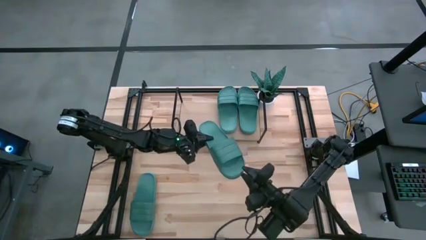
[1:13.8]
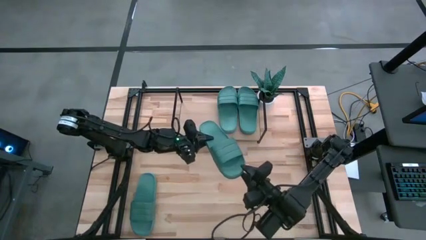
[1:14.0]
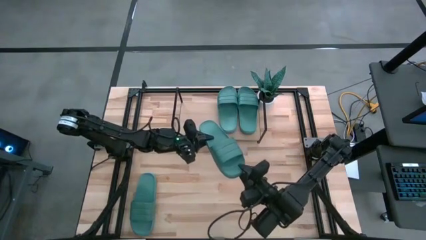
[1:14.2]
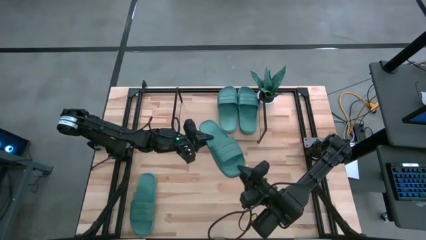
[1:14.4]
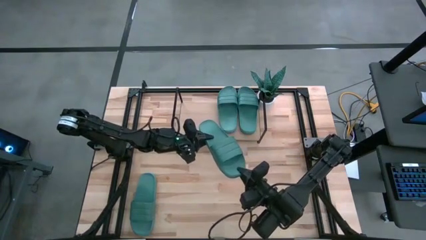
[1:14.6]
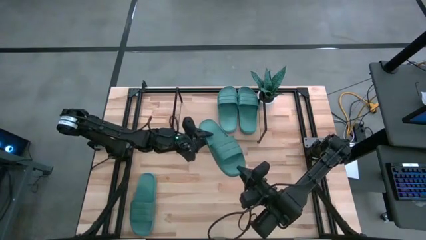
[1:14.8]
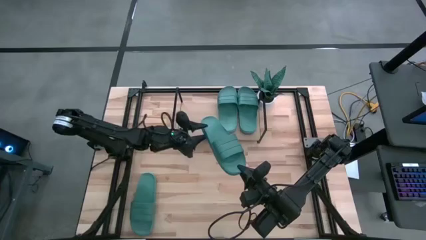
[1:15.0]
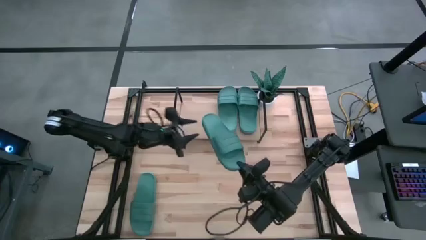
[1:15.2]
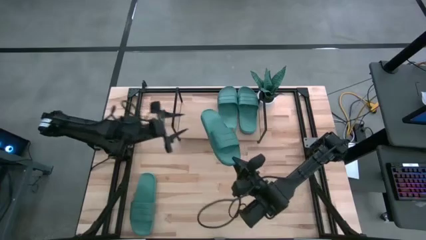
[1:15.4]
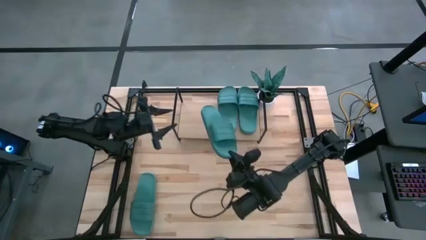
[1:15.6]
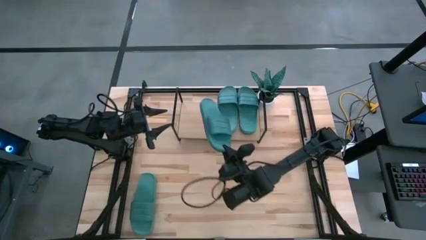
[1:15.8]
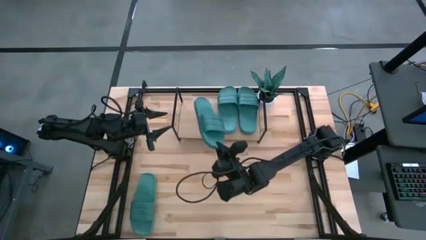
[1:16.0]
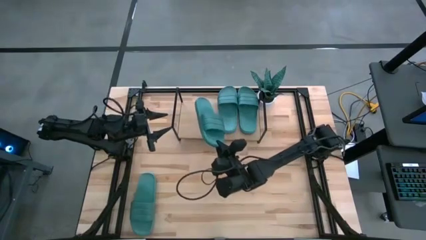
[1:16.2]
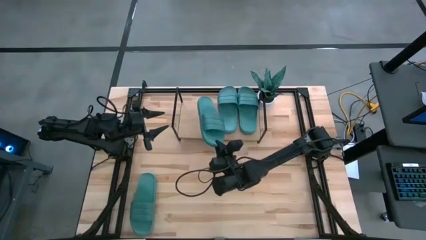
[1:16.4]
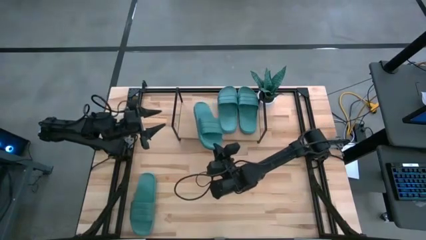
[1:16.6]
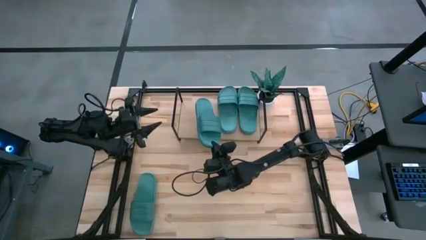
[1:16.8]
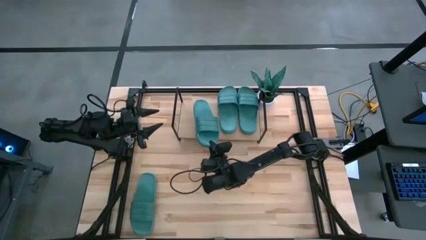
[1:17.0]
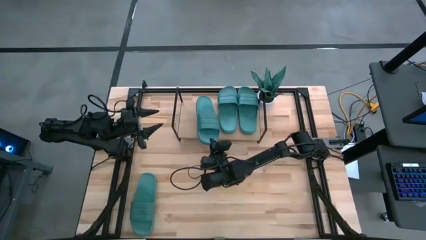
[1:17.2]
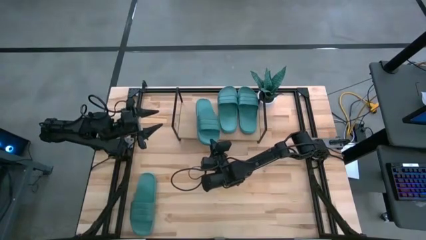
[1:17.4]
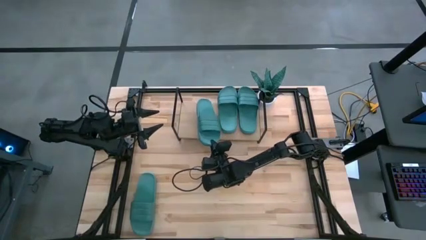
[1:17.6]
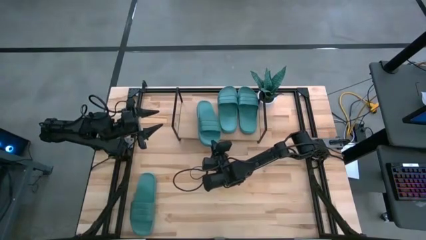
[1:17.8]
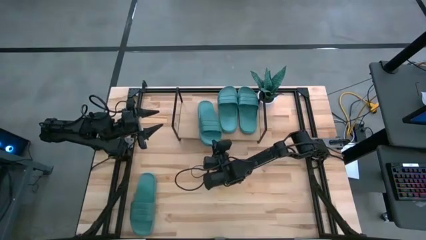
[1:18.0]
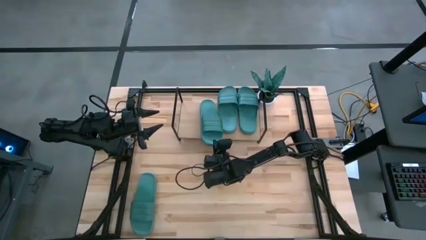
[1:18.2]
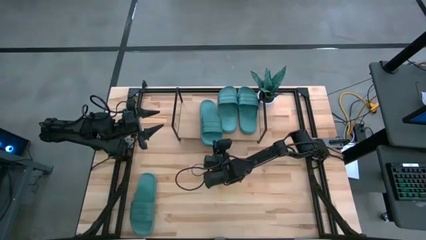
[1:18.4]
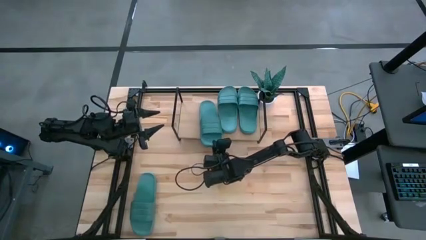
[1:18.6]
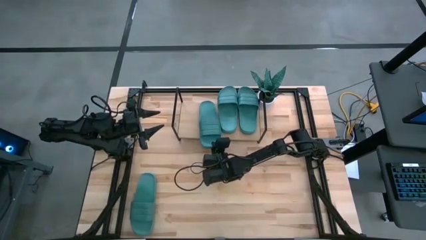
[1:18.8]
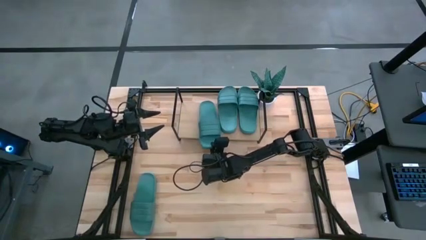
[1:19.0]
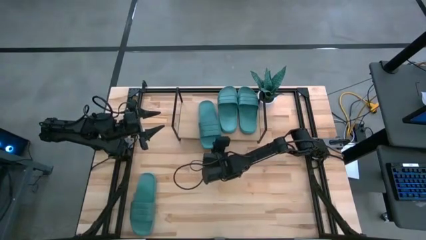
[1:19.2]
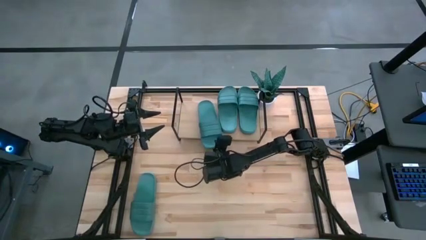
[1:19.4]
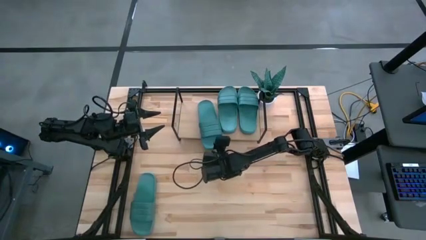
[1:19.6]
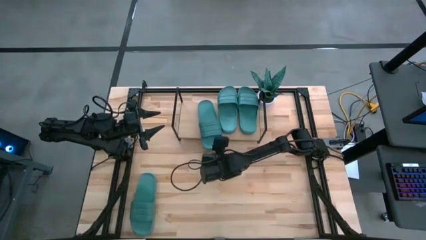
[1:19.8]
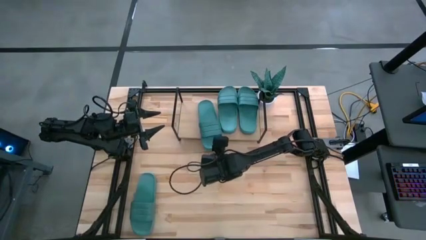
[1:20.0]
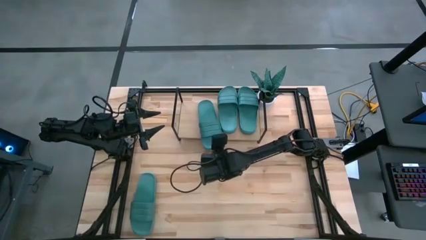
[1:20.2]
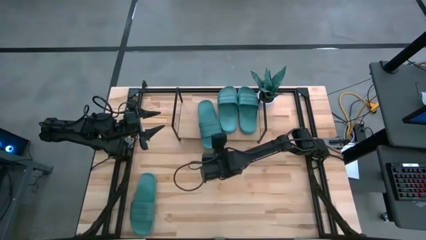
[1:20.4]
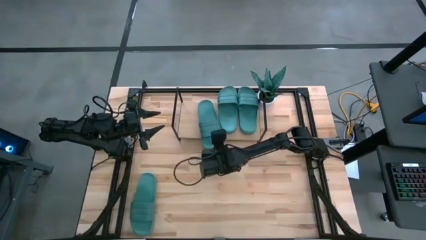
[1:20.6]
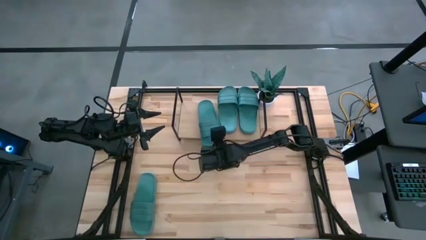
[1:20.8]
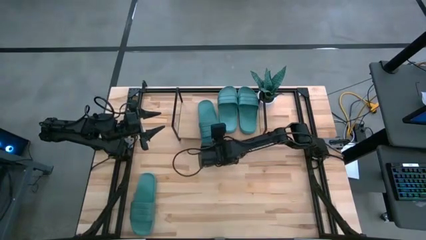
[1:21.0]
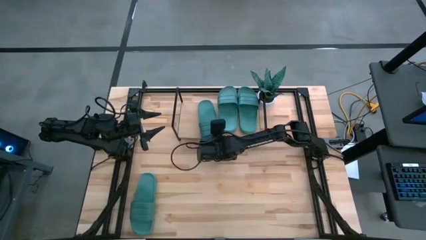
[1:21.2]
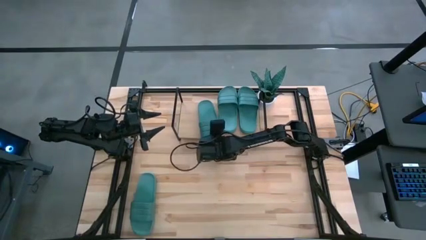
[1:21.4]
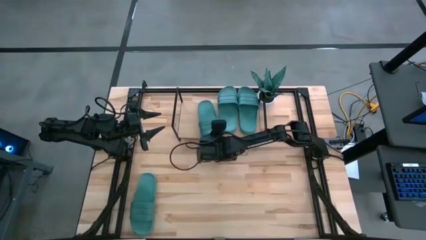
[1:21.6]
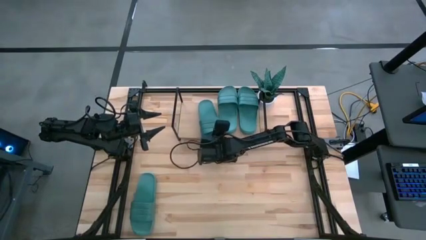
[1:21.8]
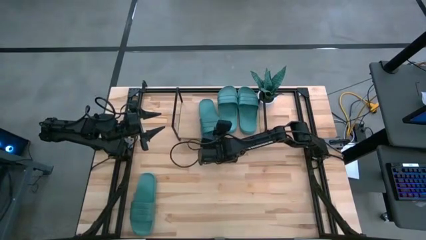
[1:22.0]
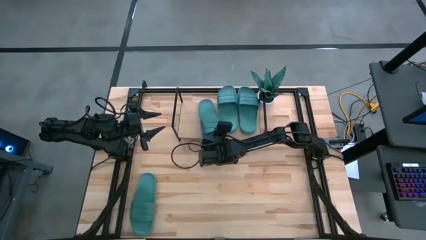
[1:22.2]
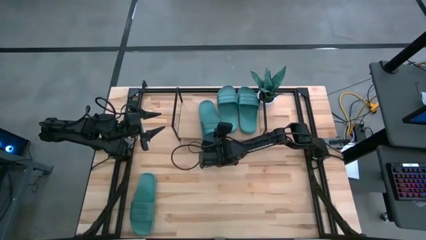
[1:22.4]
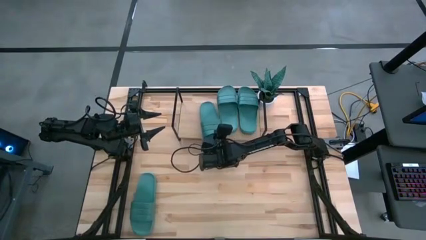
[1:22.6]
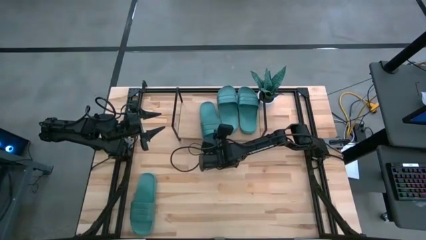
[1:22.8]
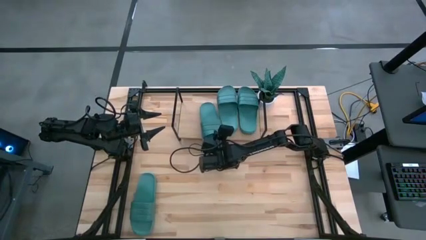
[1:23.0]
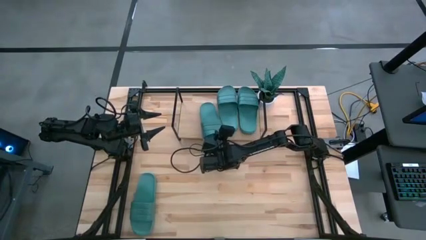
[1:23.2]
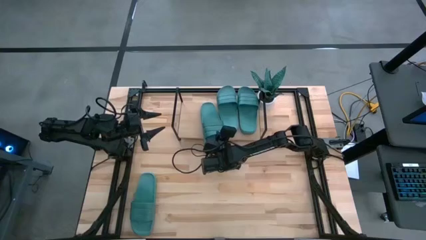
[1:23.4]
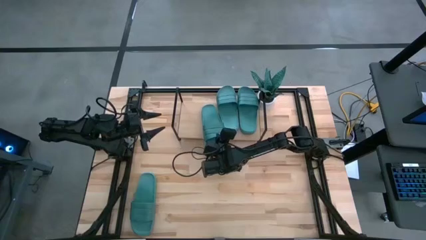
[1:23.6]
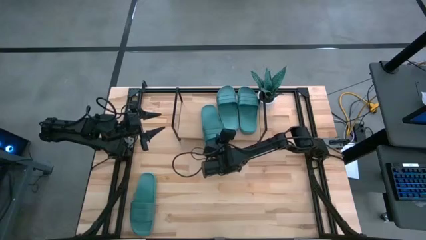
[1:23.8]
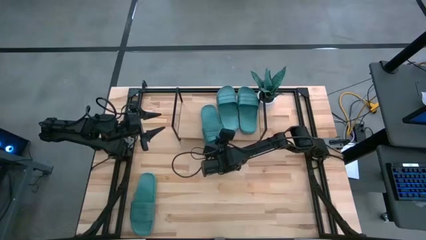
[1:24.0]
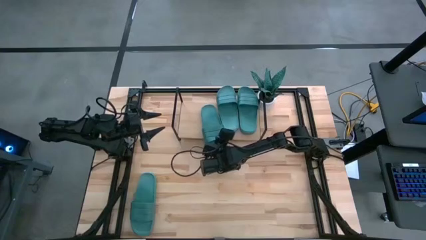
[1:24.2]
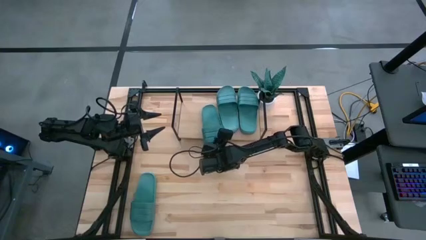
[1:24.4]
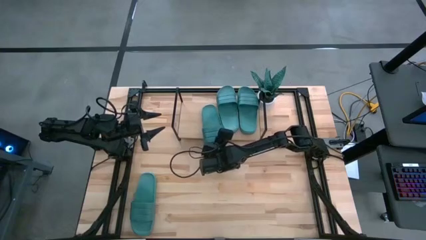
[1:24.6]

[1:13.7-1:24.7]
Task: Pick and place slides into the shelf
Put the green slipper on the shelf
